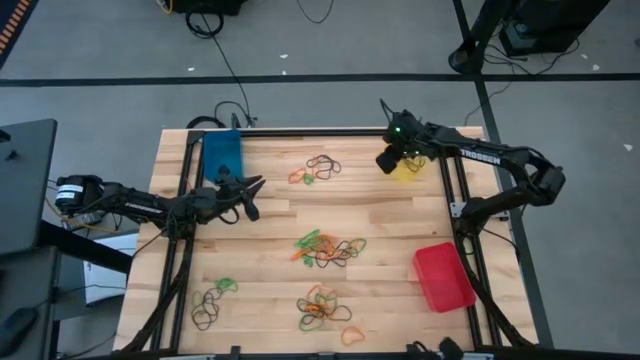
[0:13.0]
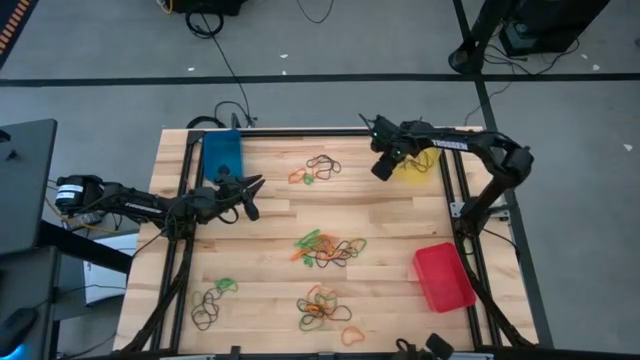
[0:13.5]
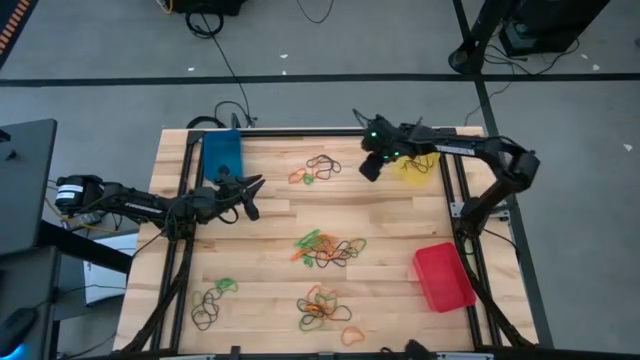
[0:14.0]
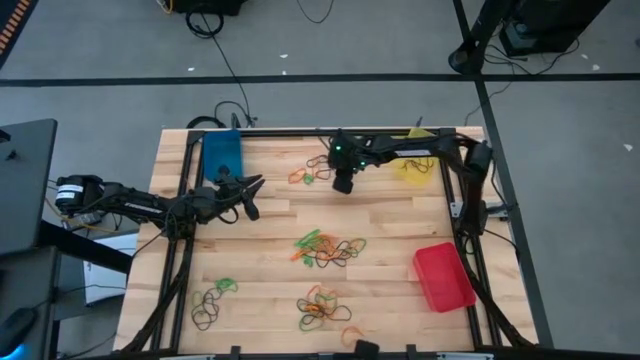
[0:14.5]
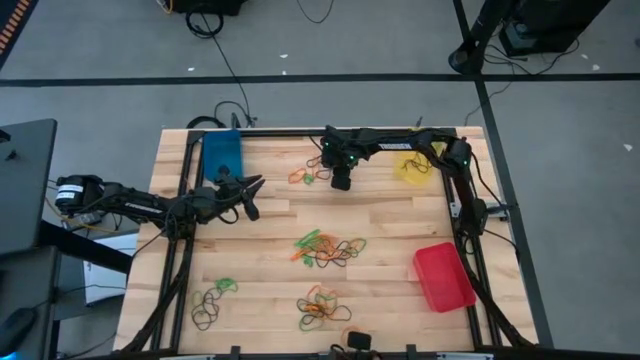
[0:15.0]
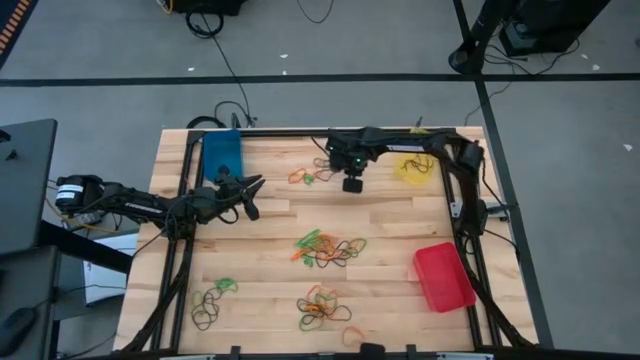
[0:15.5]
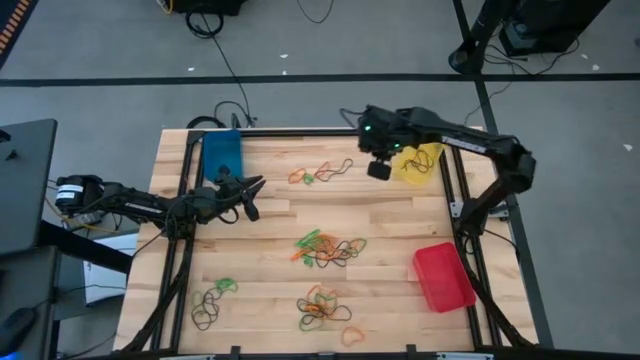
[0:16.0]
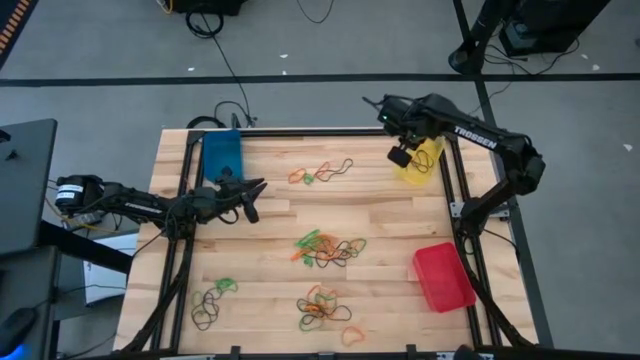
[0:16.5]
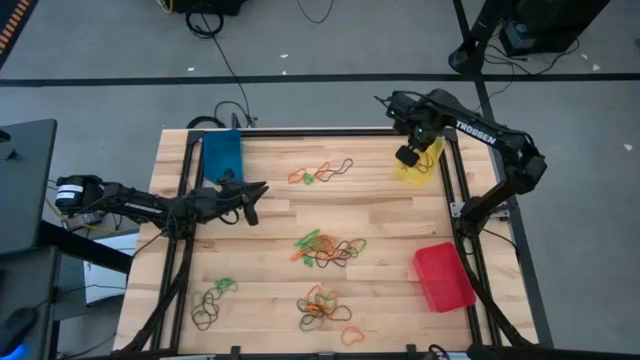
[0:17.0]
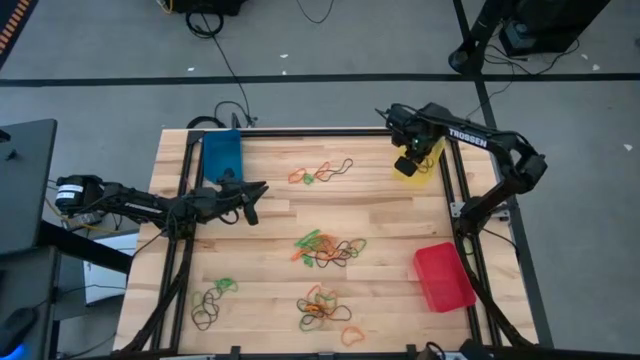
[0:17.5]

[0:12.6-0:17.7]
Task: Sort rubber bands into baskets
Put the brown rubber band into the yellow bin

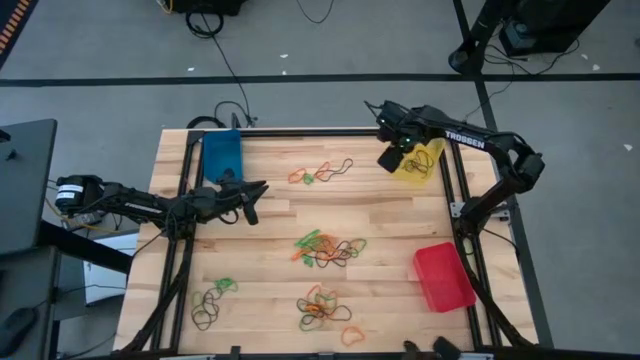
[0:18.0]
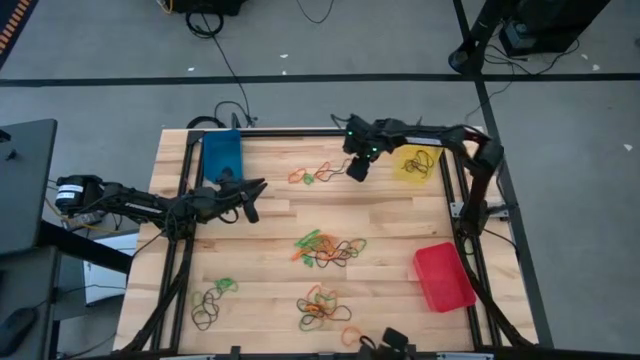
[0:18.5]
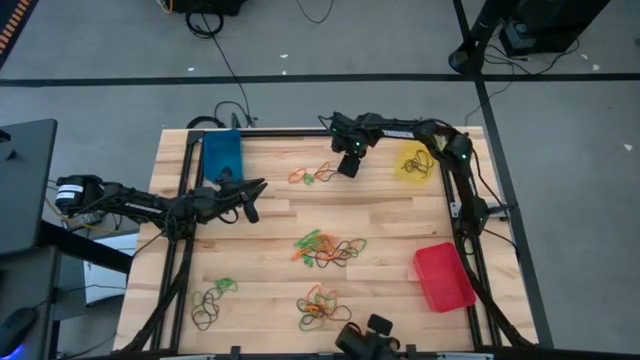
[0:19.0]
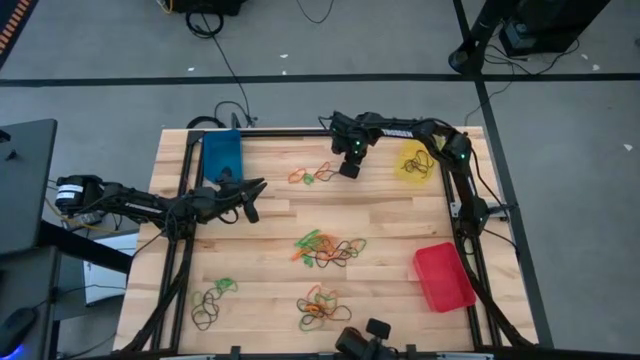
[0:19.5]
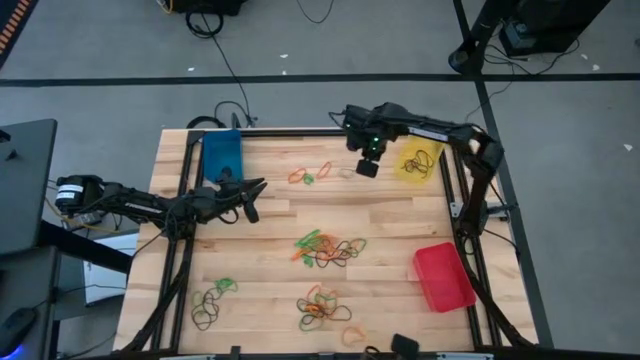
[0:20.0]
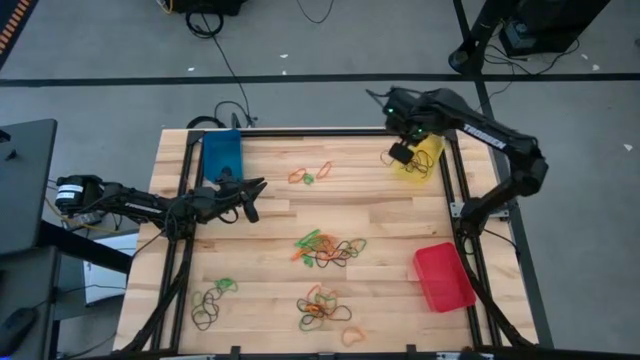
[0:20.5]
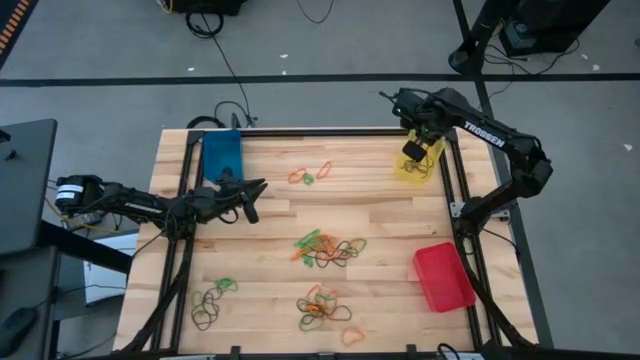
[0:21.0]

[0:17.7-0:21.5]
Put the brown rubber band into the yellow bin

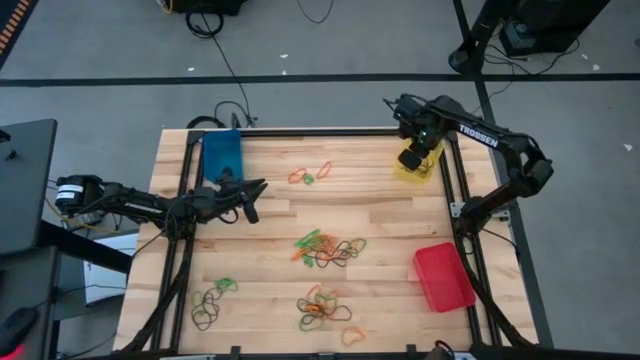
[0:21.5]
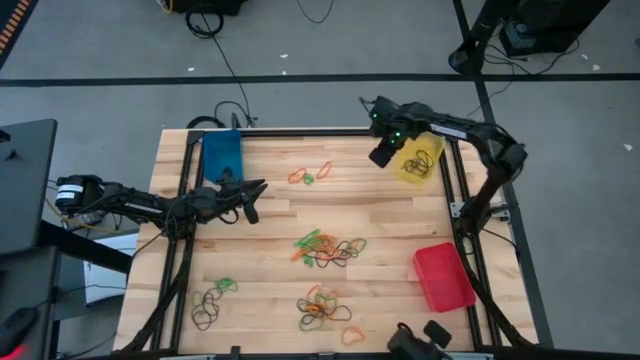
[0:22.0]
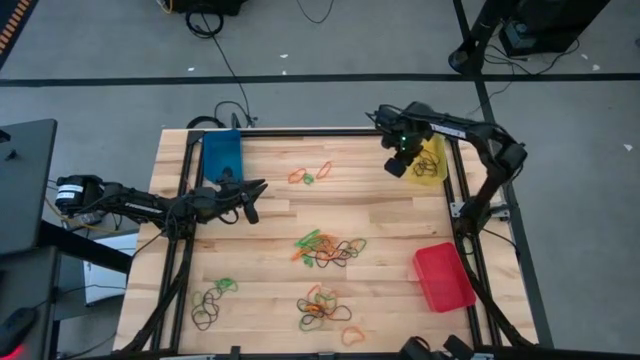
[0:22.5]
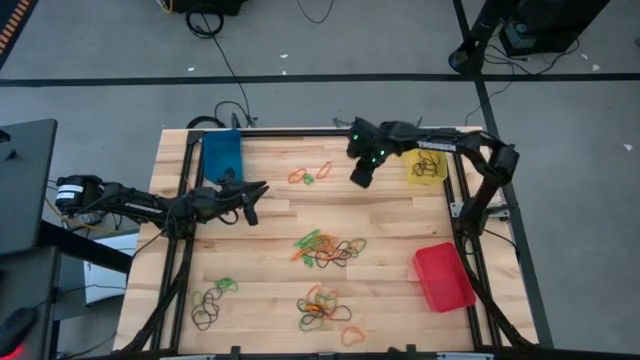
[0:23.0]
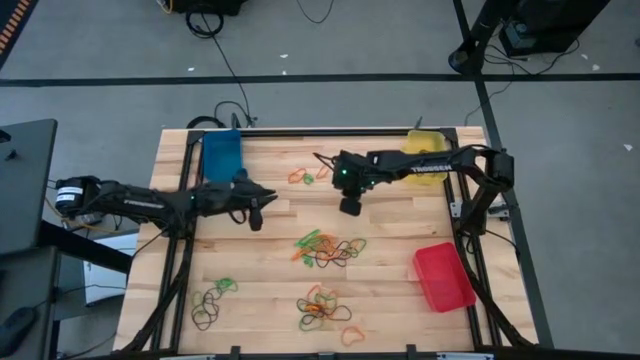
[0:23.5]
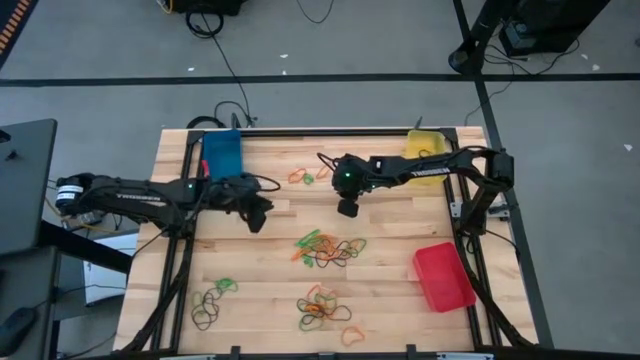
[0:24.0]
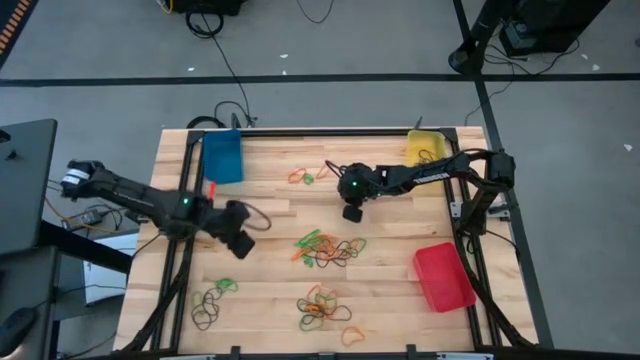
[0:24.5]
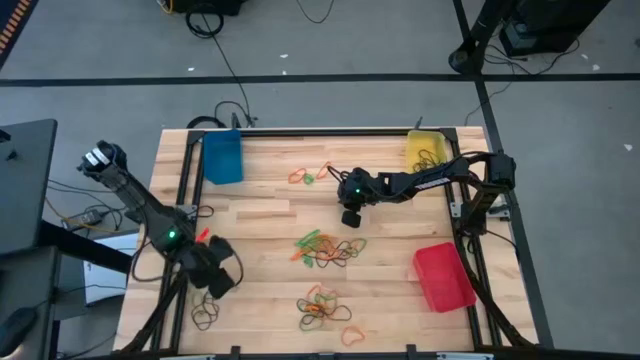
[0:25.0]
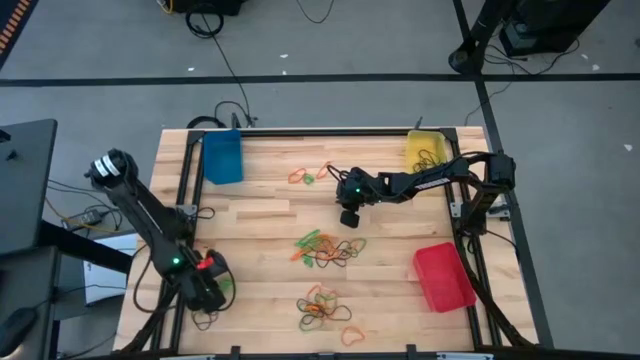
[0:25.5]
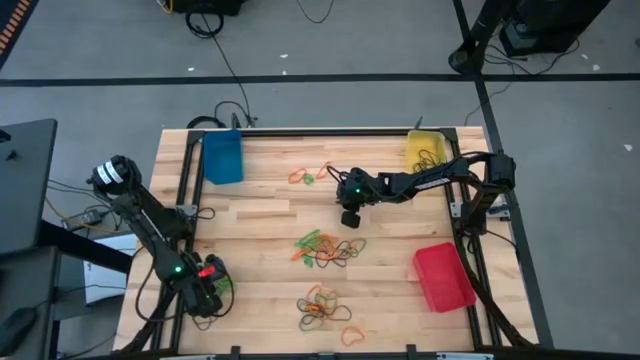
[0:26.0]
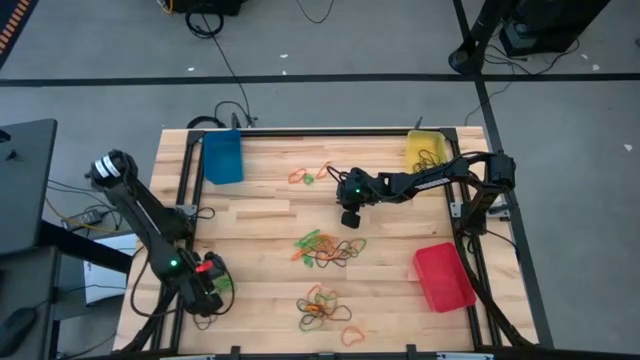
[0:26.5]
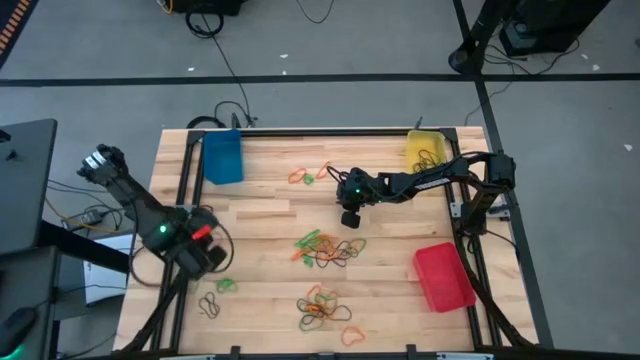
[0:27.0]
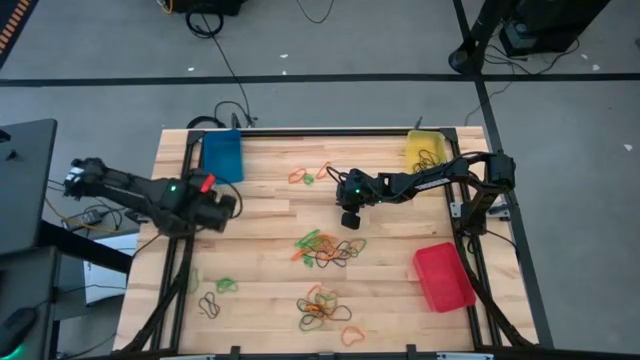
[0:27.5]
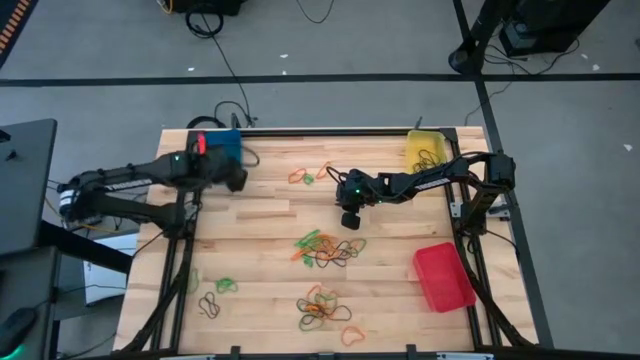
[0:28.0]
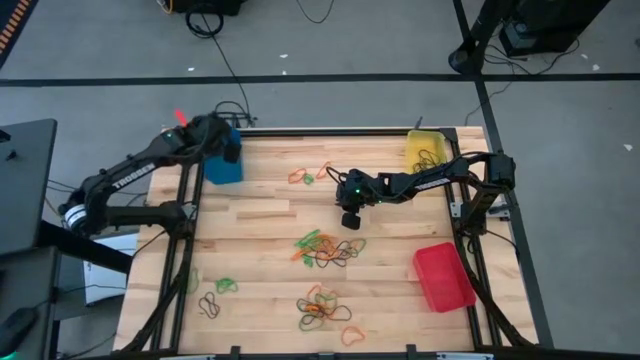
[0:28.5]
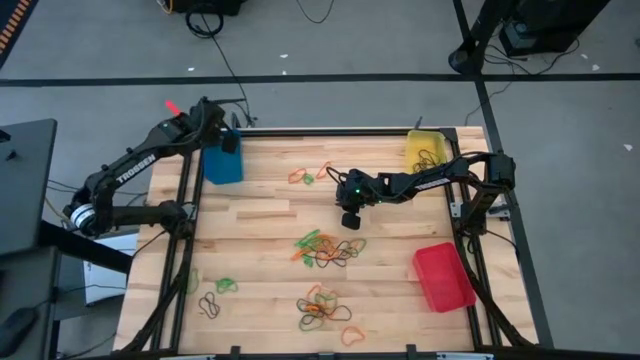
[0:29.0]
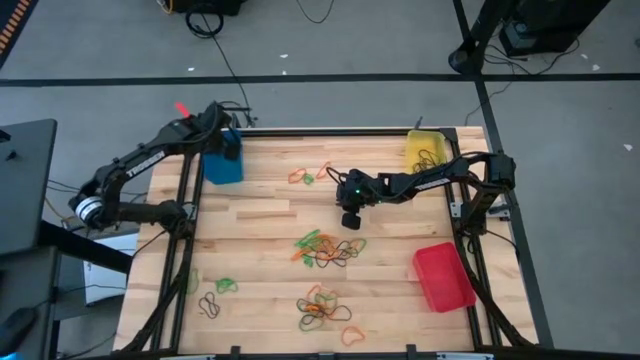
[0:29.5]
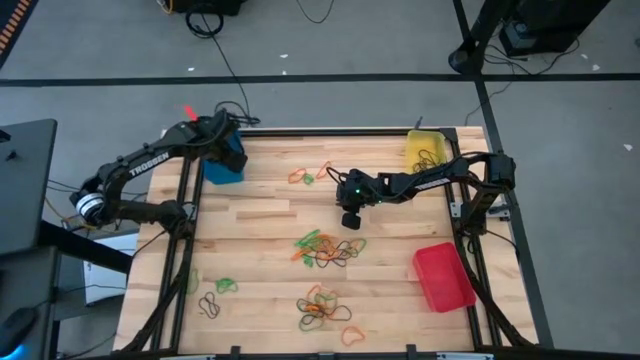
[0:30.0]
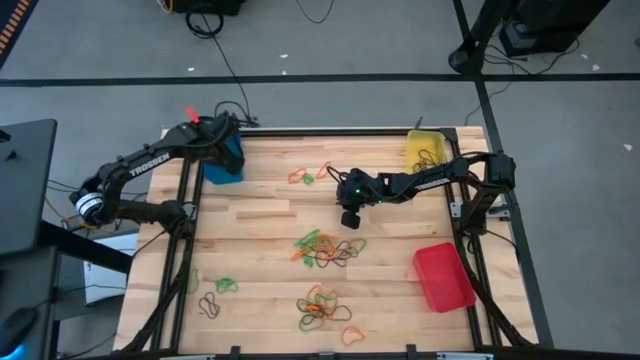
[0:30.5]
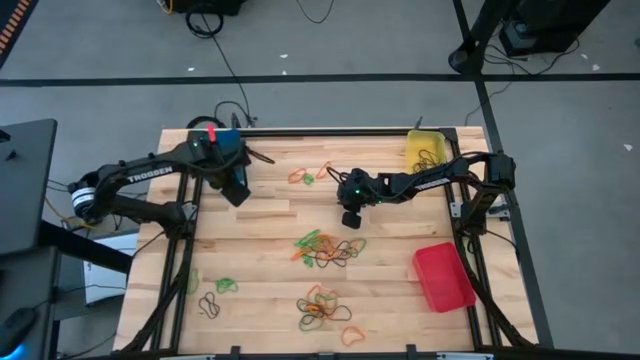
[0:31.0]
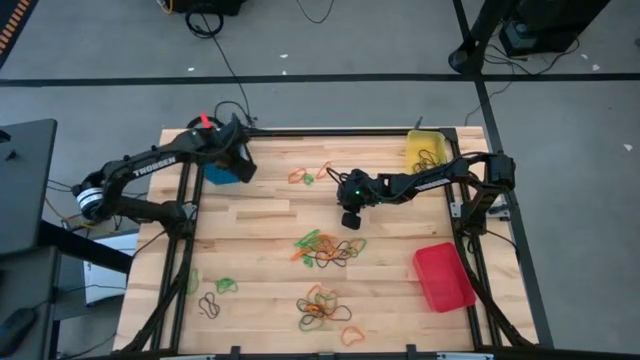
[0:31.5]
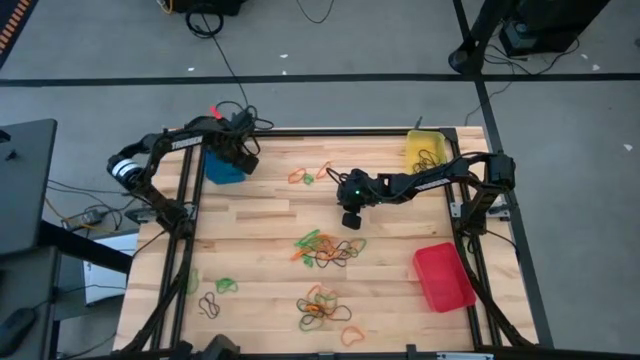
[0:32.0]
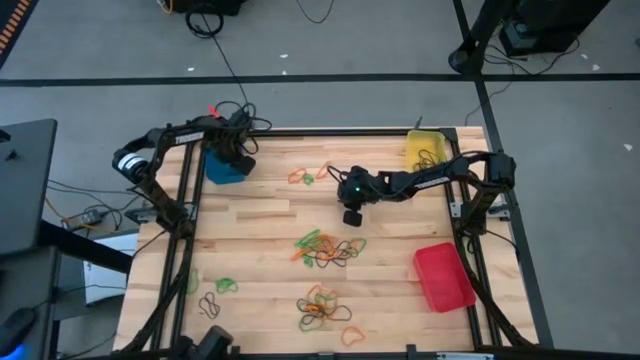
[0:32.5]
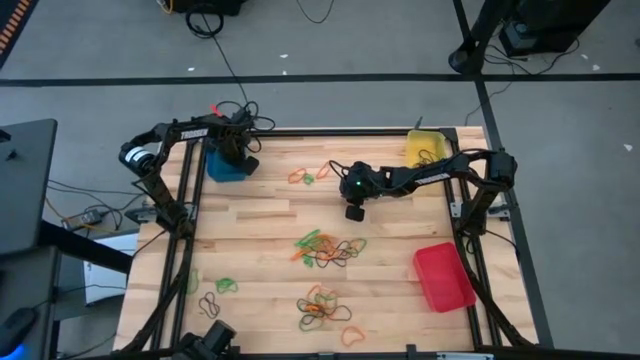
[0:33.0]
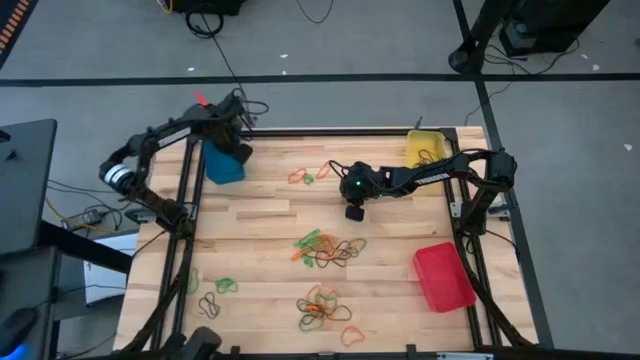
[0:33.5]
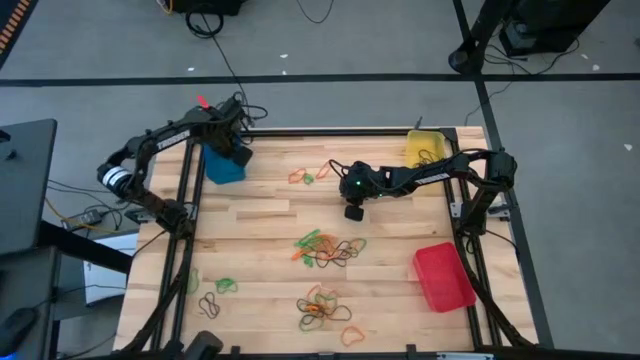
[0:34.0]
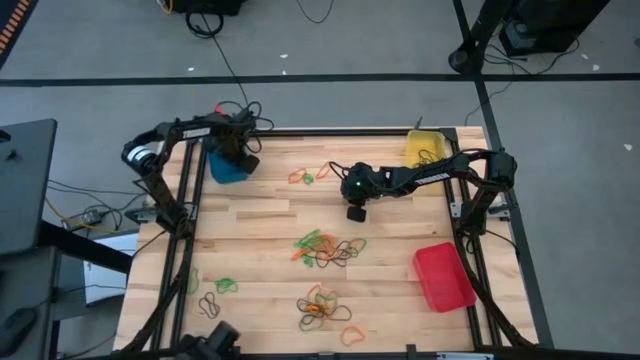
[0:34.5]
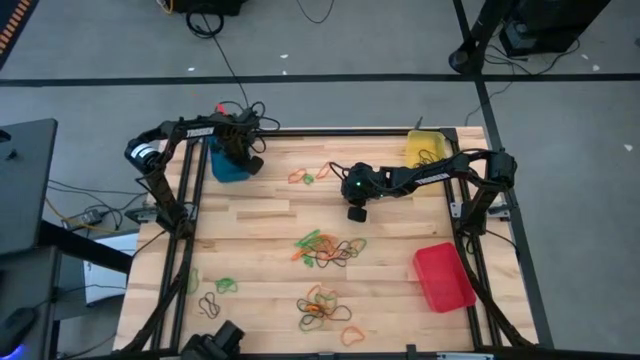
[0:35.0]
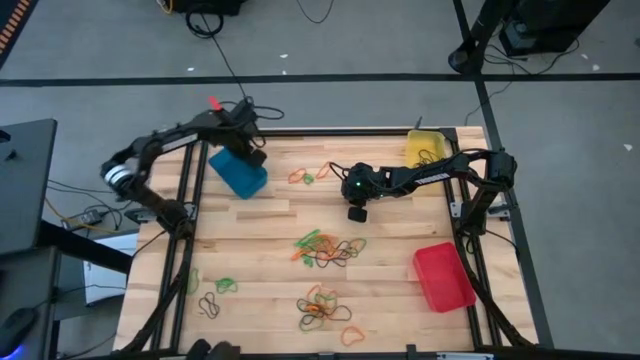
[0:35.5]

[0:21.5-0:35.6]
Put the brown rubber band into the yellow bin
